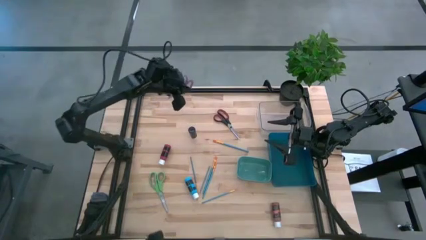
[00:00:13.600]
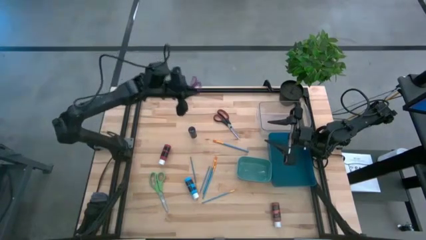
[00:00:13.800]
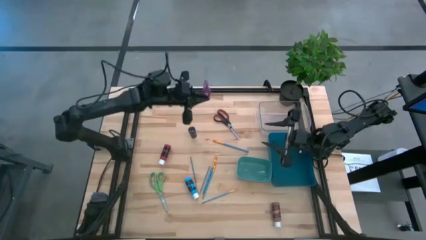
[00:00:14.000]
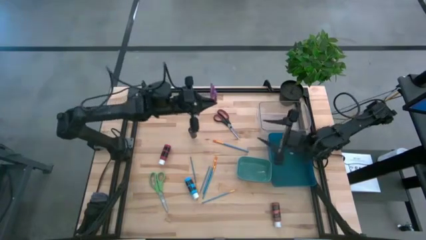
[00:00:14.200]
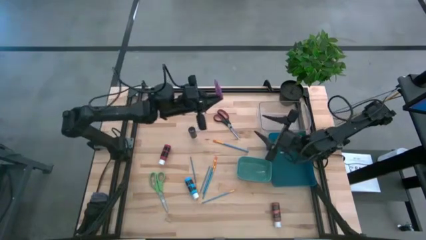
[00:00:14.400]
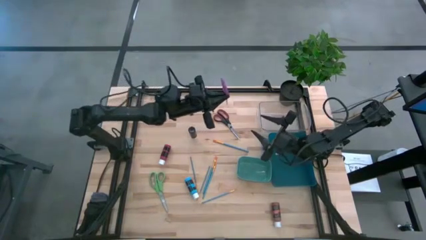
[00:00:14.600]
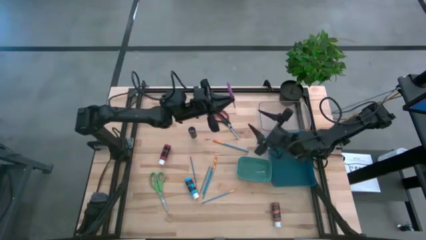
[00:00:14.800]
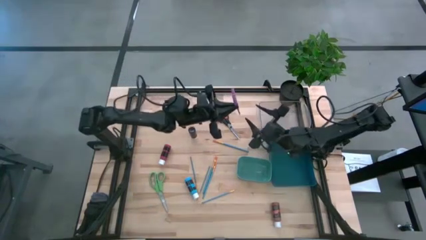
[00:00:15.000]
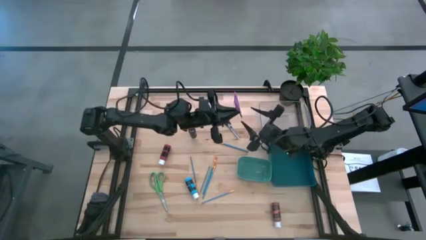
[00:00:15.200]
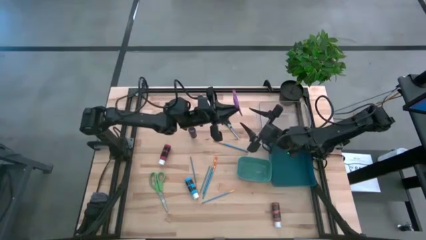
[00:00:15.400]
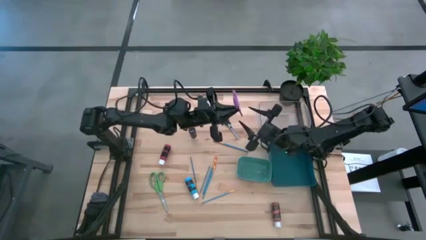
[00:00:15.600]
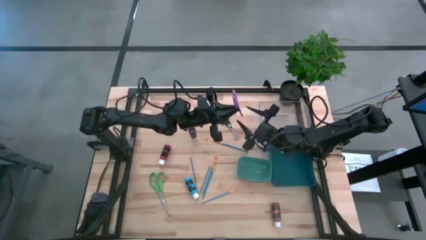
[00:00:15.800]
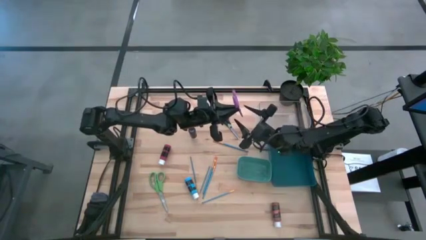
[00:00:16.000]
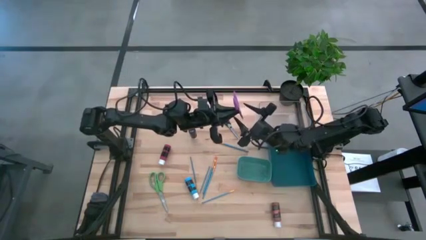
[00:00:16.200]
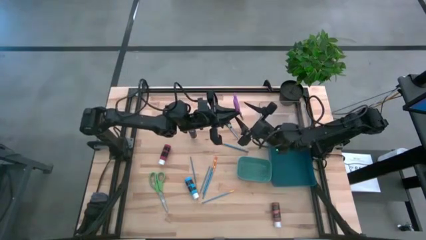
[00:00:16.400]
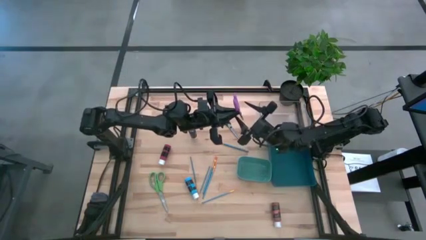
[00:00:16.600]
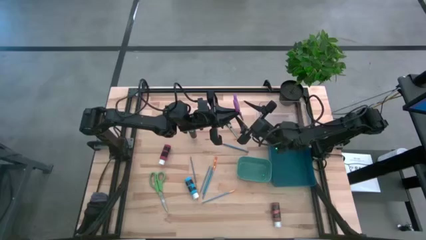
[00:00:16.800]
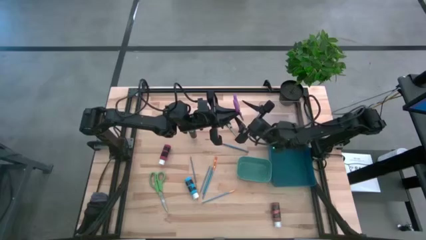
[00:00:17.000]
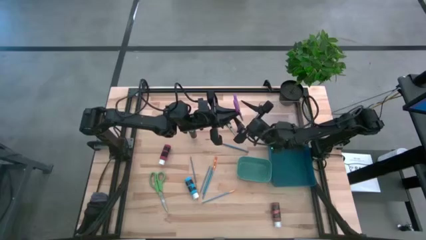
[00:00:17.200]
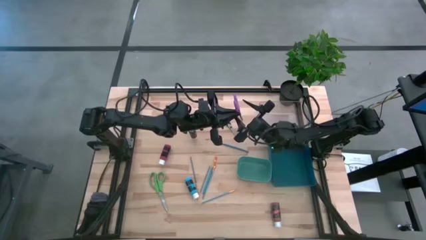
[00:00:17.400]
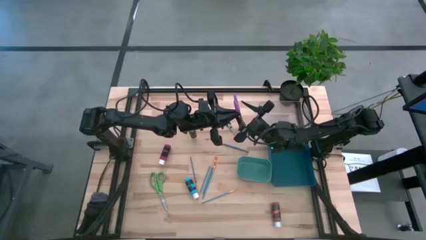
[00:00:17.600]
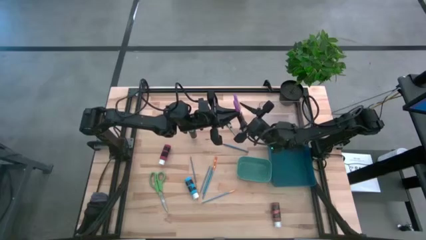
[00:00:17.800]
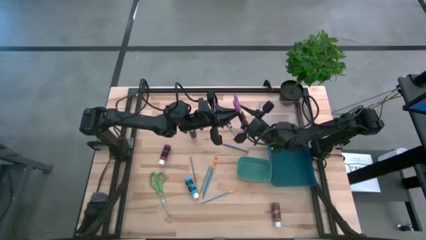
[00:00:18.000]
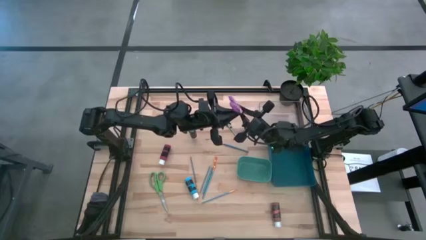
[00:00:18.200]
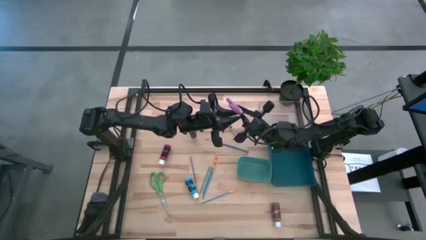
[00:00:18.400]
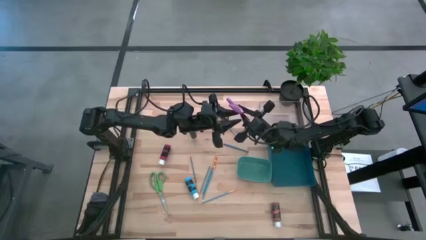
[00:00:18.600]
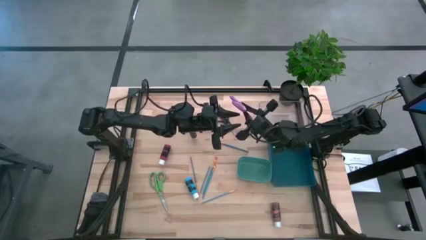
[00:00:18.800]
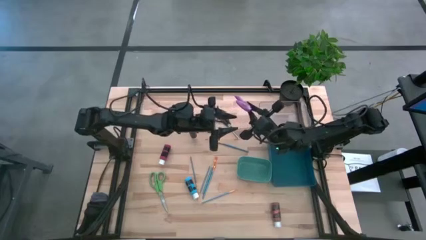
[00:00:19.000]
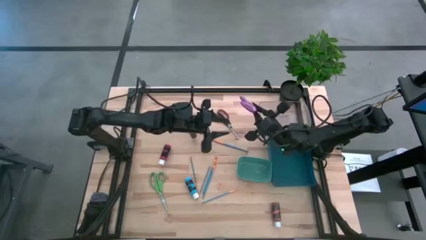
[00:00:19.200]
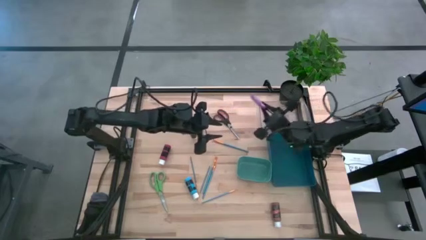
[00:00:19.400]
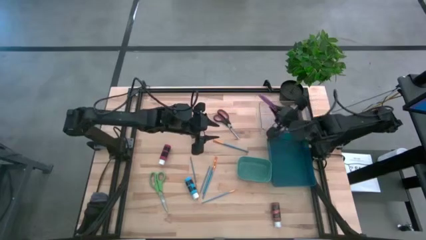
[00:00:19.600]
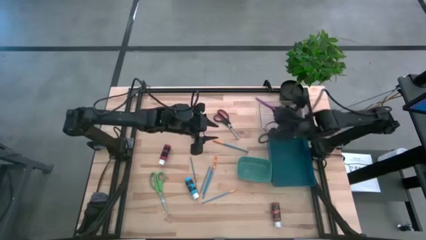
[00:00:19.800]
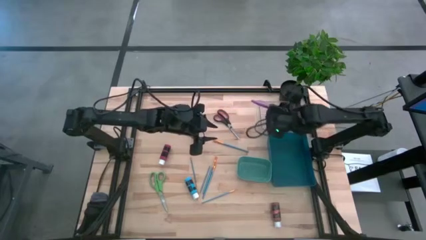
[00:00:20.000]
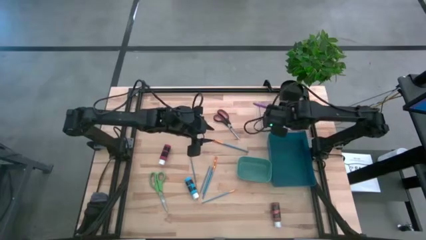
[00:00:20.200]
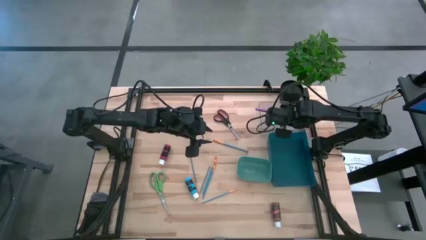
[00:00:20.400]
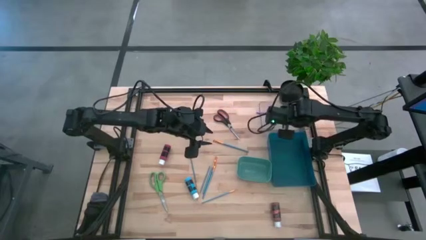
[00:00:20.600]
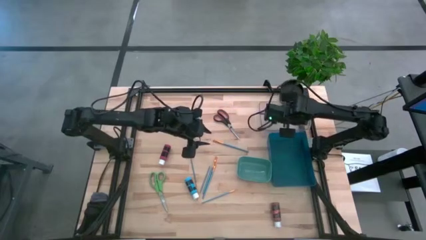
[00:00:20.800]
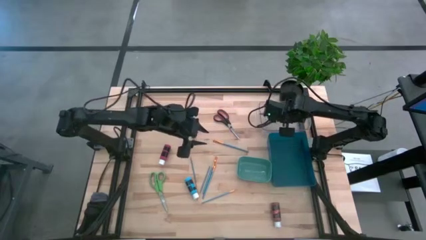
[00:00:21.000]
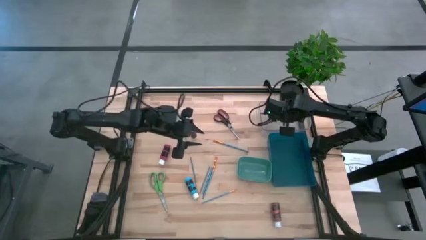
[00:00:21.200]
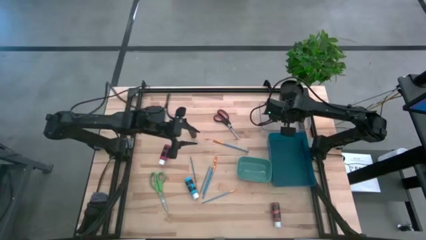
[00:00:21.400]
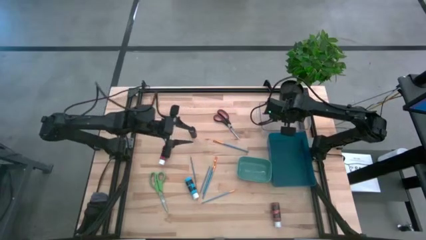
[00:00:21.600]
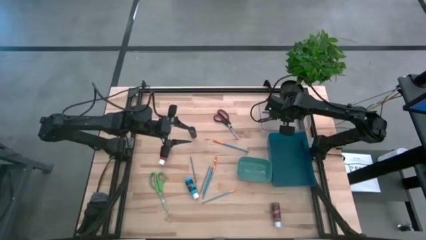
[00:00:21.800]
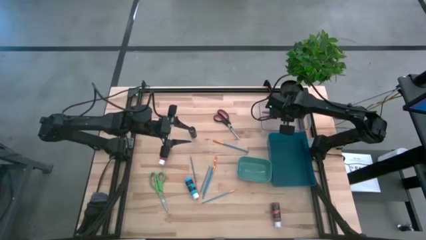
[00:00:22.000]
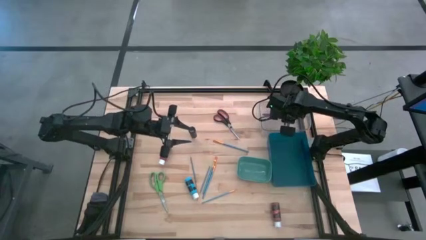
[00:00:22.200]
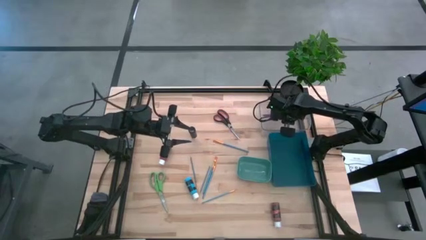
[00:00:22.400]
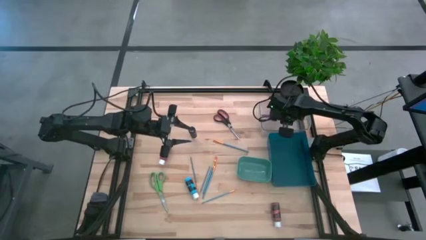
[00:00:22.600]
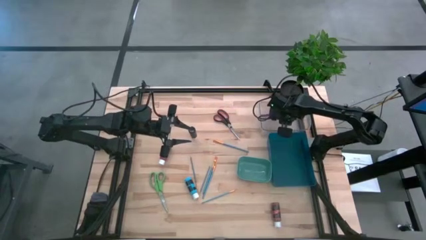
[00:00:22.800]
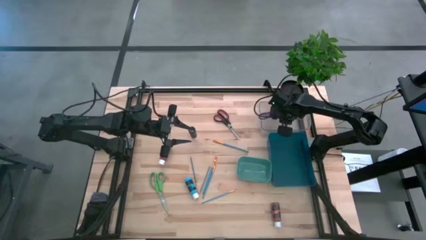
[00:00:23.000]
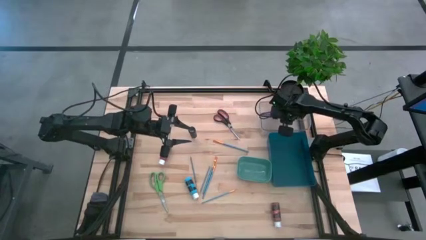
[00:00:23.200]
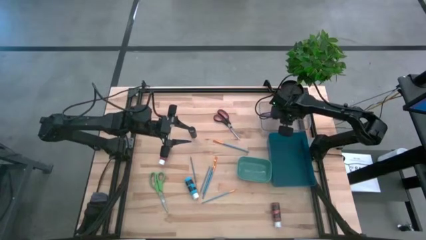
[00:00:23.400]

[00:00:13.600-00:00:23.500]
Task: Pick & Place Paint Supplies
Put the purple scissors into the transparent bin

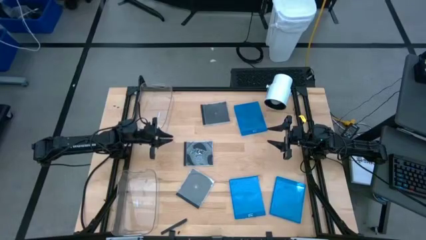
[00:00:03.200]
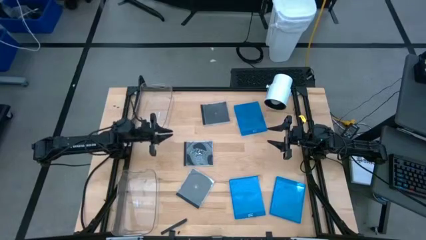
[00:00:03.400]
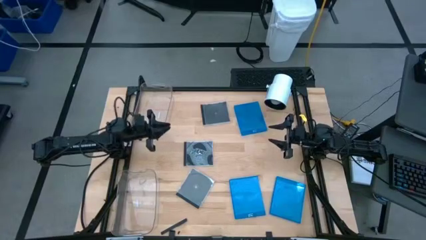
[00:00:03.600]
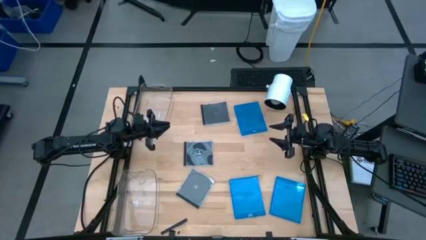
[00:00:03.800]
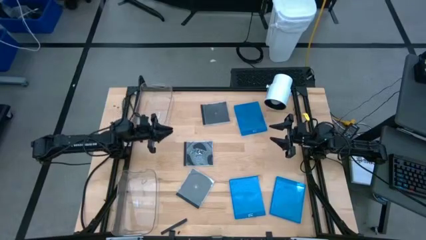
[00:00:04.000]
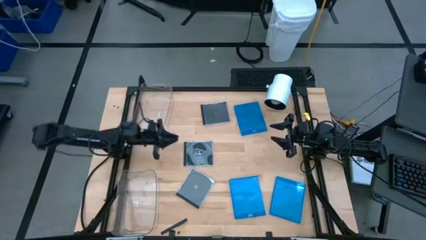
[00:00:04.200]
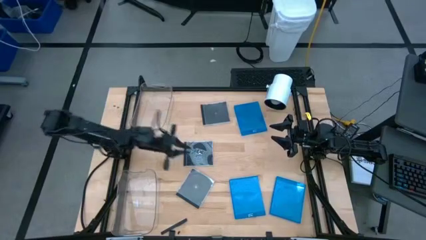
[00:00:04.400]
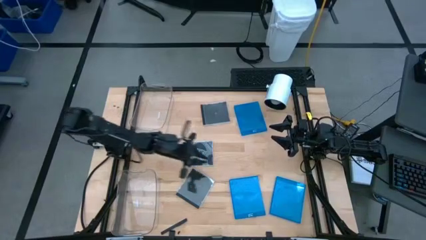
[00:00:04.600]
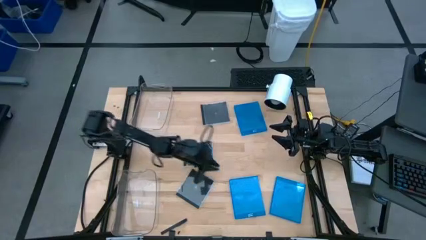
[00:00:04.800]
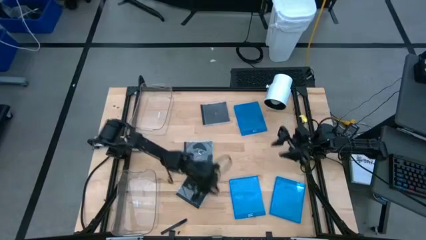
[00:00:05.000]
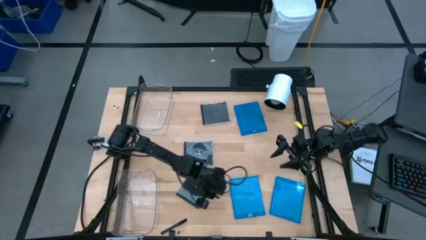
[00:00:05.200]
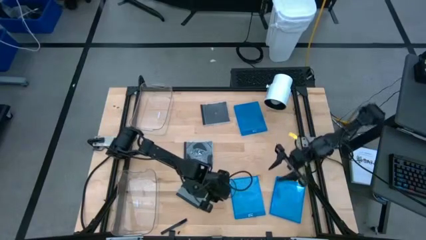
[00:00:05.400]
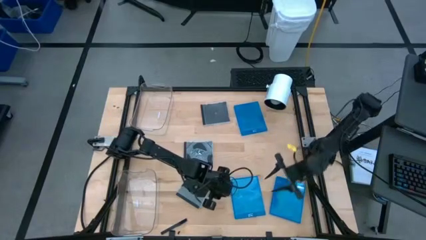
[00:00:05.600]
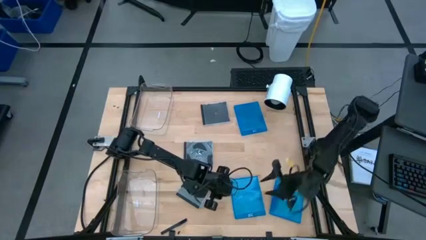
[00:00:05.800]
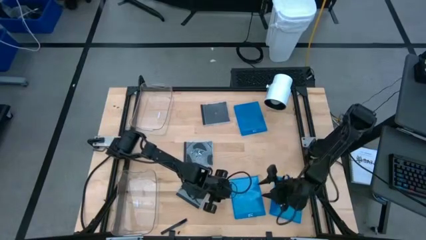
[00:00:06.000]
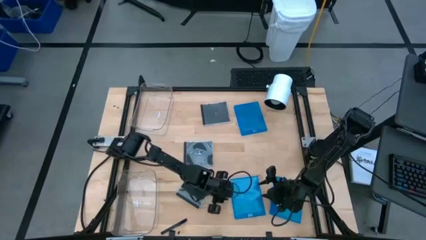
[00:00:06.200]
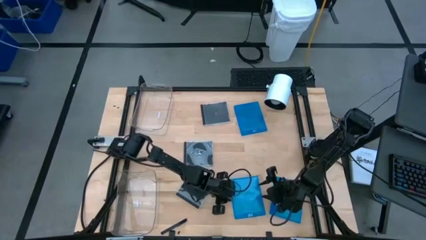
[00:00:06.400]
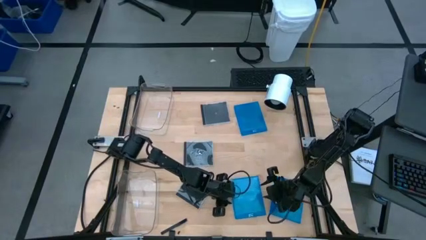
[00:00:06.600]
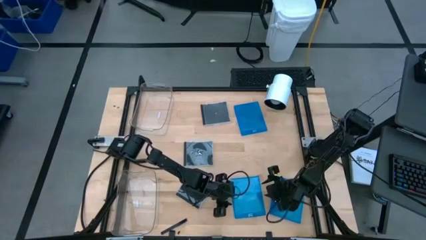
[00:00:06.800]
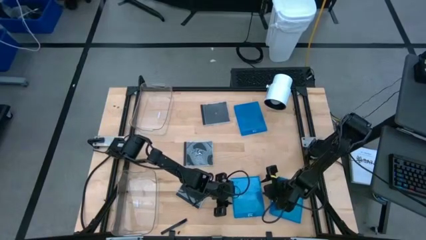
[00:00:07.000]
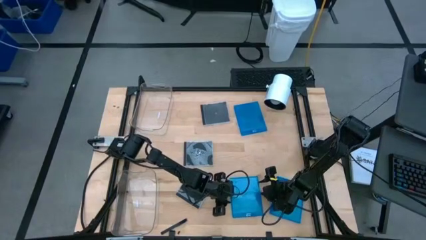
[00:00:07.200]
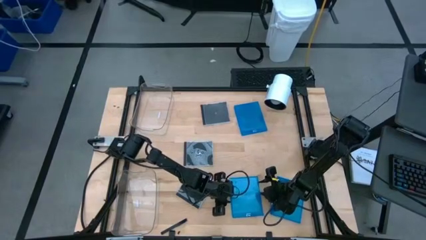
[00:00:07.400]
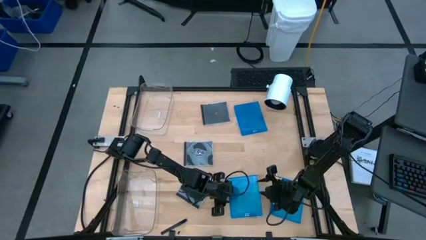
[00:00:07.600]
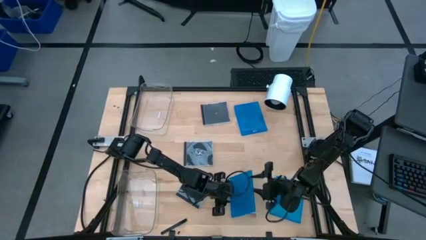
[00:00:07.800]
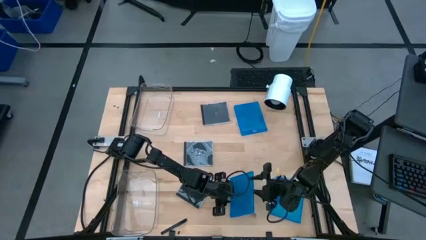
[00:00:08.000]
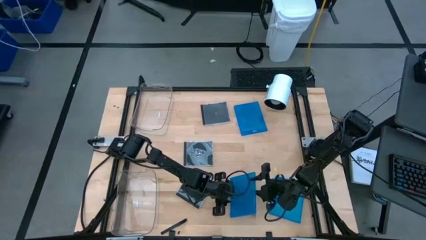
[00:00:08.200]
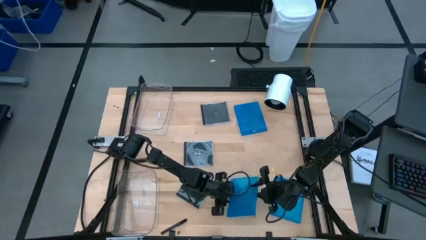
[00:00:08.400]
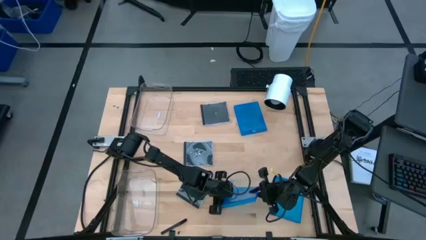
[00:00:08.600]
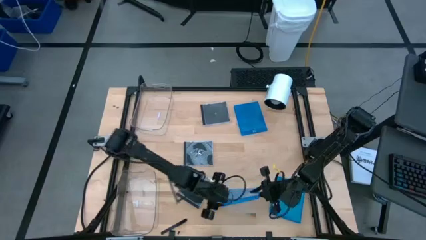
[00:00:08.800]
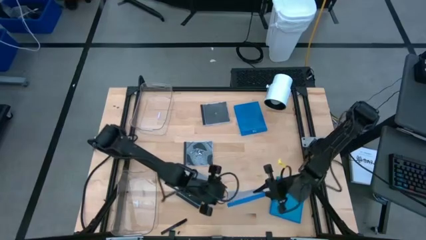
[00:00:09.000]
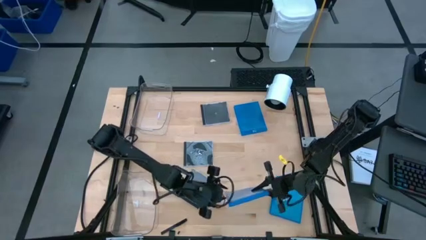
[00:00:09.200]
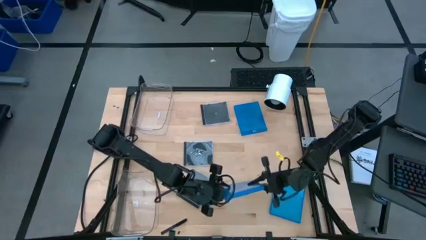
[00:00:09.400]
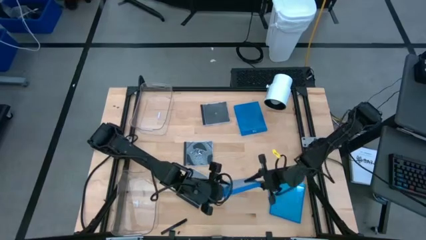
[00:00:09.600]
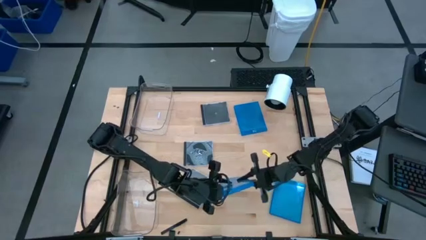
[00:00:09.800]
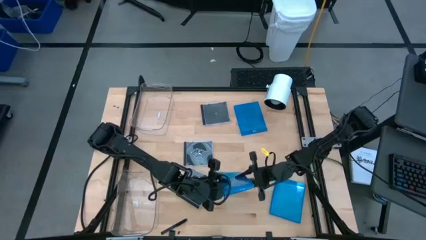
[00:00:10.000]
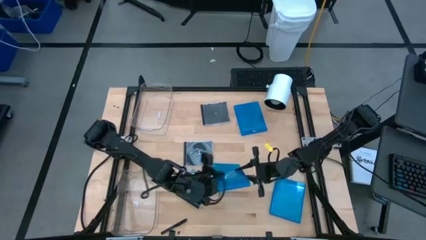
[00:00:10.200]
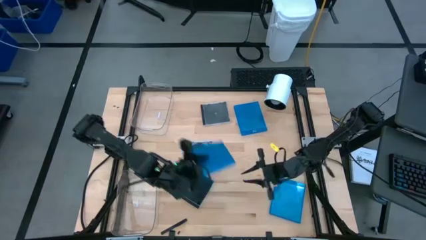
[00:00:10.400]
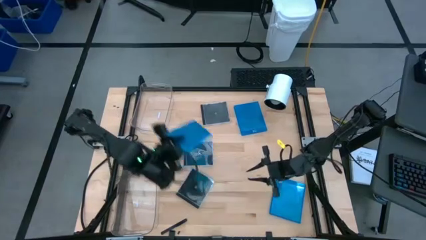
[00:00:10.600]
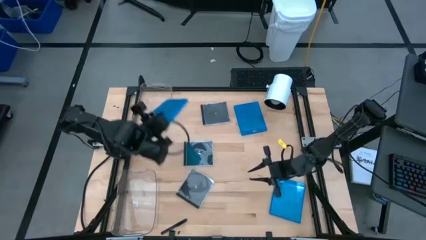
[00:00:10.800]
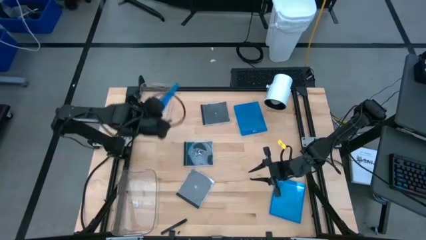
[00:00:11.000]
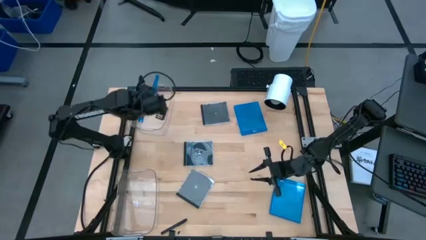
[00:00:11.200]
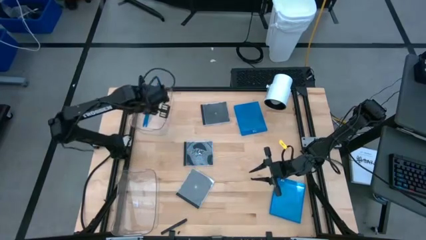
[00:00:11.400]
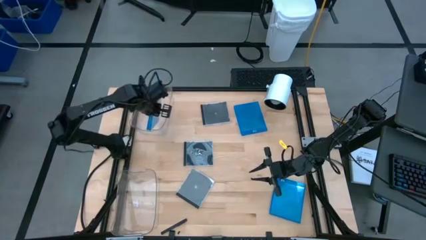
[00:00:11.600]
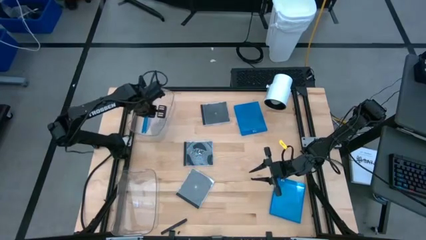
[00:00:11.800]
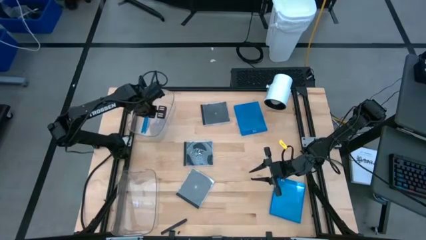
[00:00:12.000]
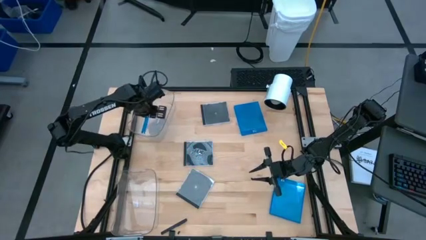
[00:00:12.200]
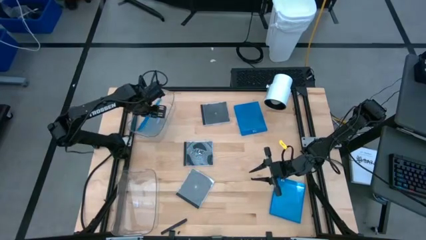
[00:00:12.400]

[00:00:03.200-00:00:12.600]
Task: Pick & place jewel cases by type
Put the bottom left blue CD case into the top transparent bin
